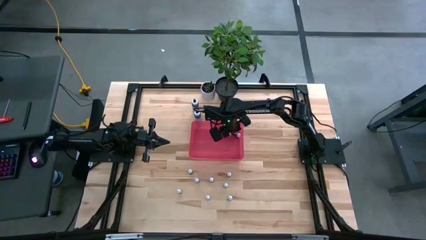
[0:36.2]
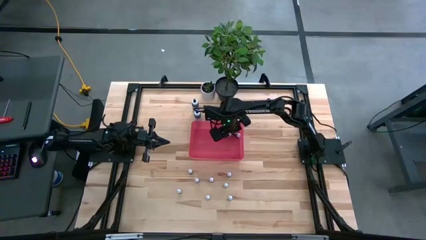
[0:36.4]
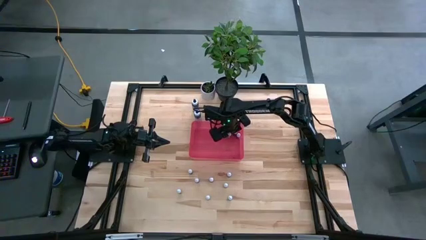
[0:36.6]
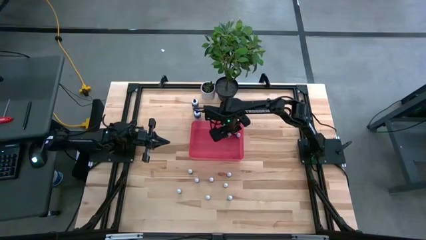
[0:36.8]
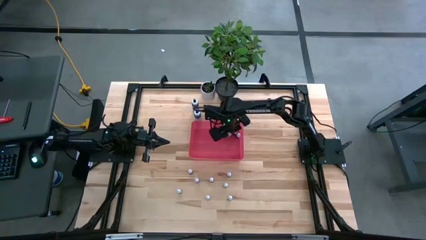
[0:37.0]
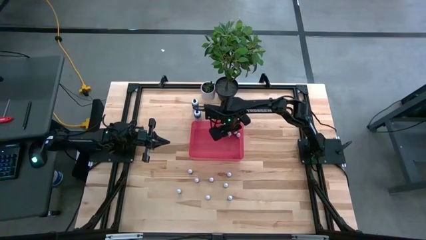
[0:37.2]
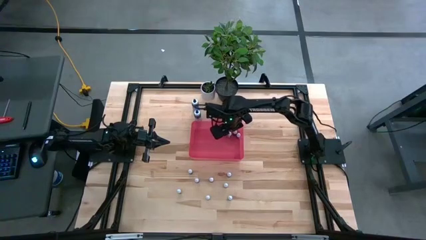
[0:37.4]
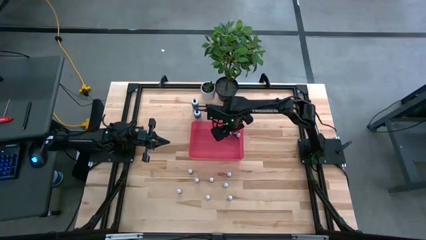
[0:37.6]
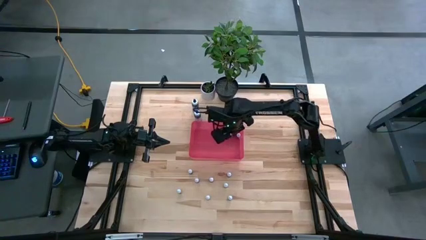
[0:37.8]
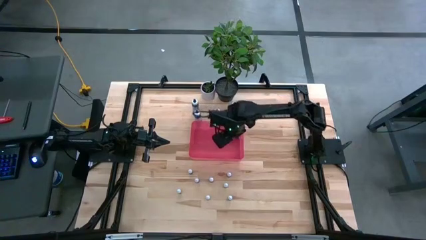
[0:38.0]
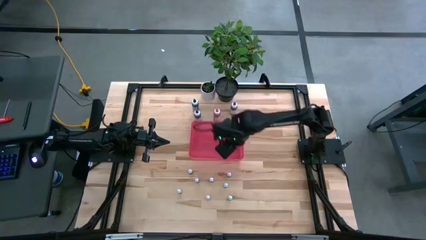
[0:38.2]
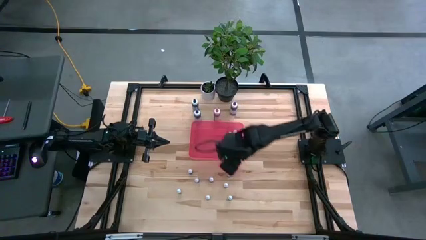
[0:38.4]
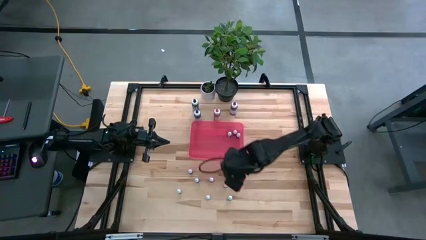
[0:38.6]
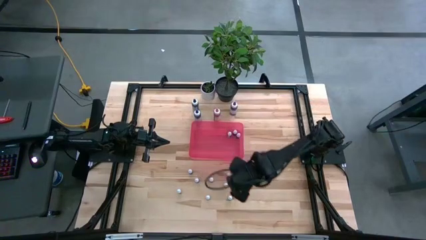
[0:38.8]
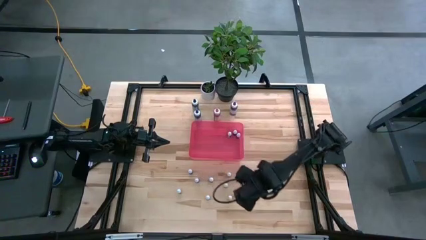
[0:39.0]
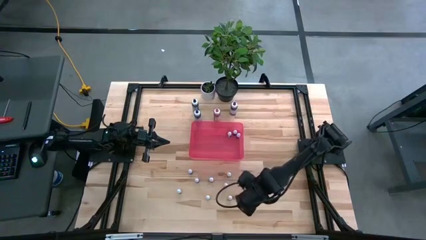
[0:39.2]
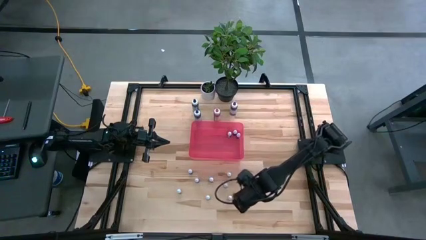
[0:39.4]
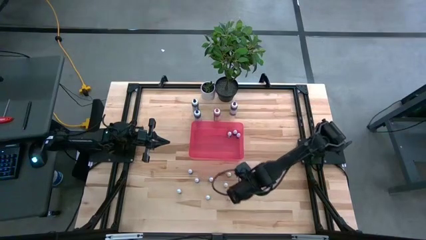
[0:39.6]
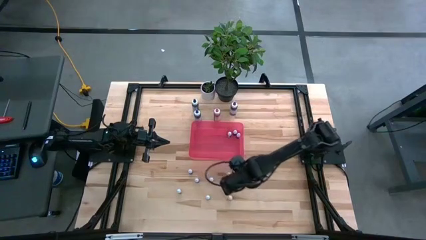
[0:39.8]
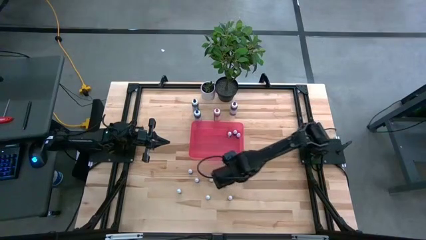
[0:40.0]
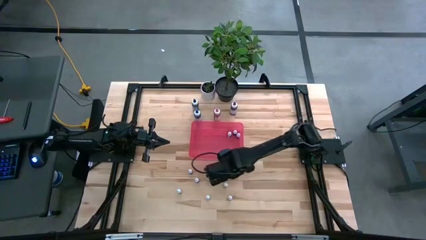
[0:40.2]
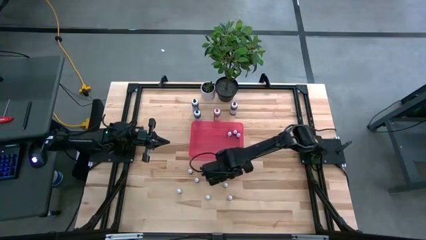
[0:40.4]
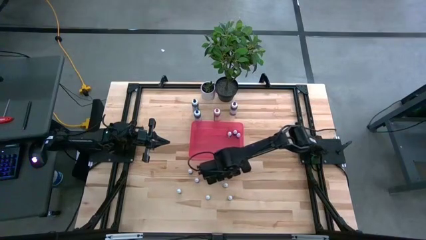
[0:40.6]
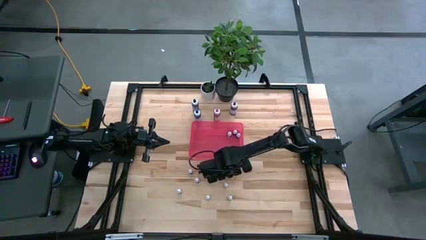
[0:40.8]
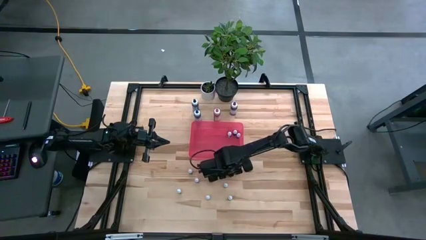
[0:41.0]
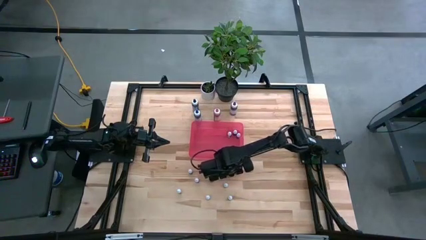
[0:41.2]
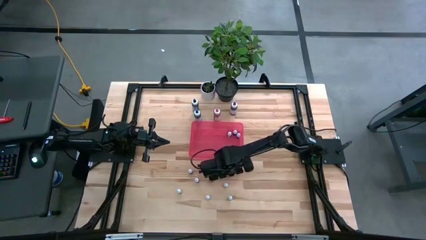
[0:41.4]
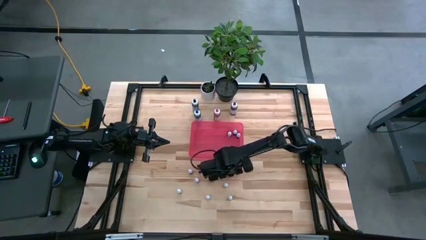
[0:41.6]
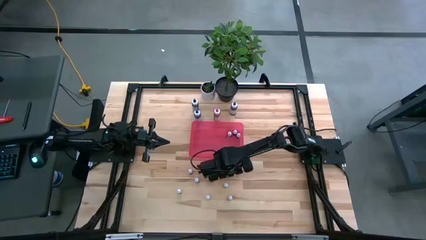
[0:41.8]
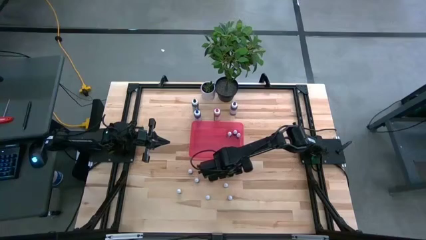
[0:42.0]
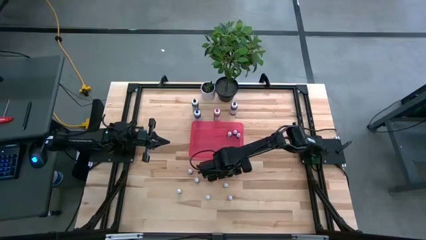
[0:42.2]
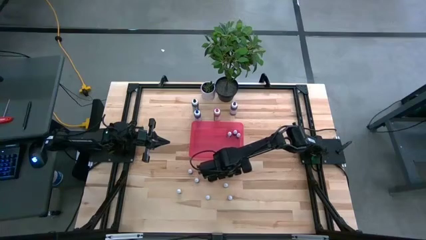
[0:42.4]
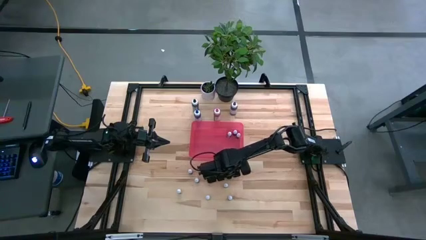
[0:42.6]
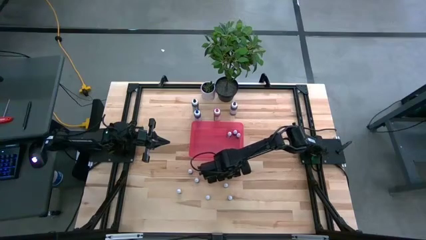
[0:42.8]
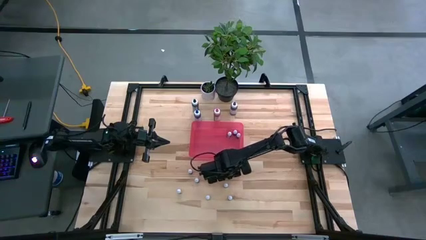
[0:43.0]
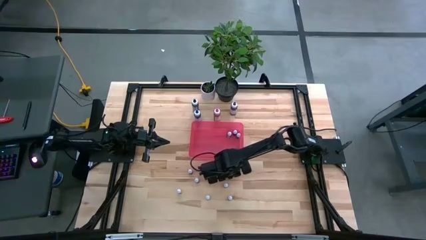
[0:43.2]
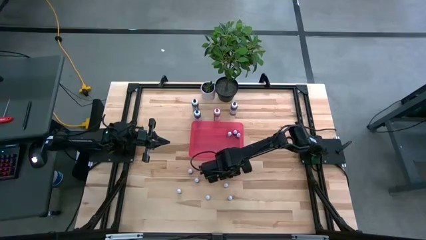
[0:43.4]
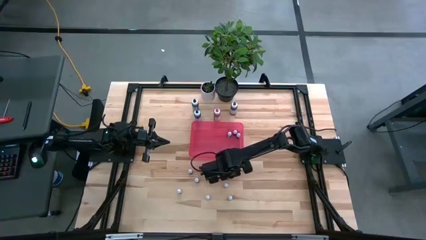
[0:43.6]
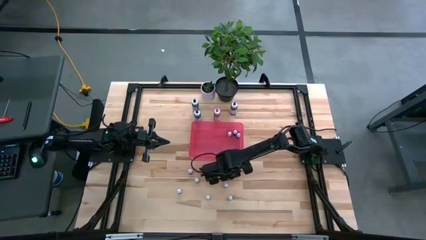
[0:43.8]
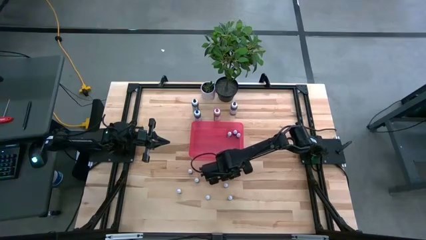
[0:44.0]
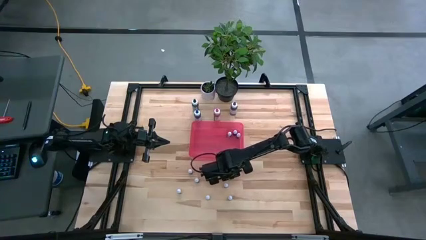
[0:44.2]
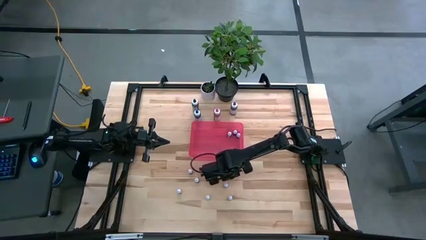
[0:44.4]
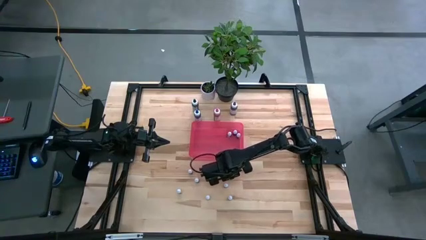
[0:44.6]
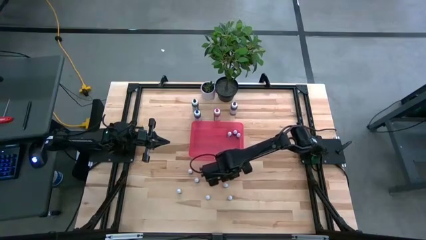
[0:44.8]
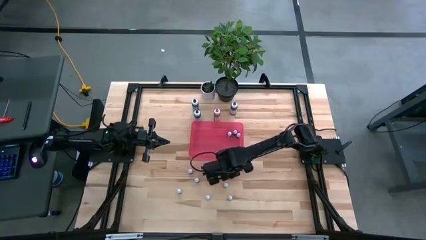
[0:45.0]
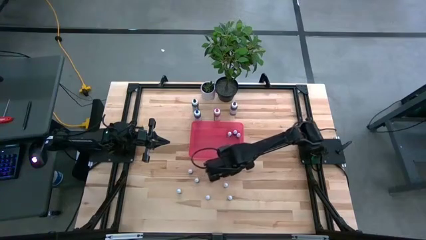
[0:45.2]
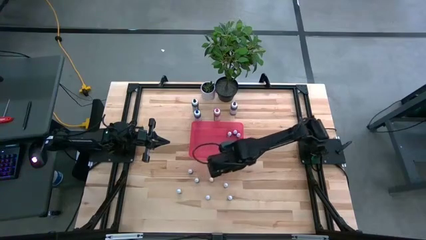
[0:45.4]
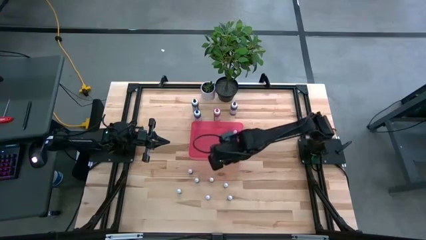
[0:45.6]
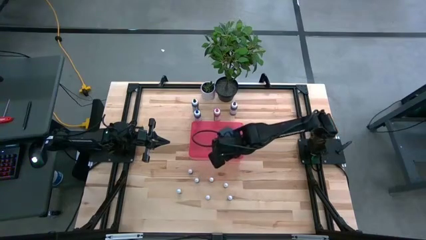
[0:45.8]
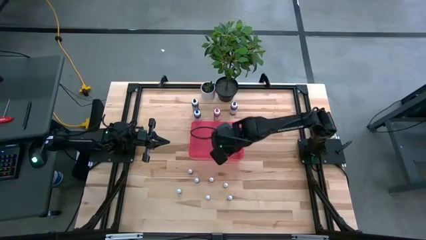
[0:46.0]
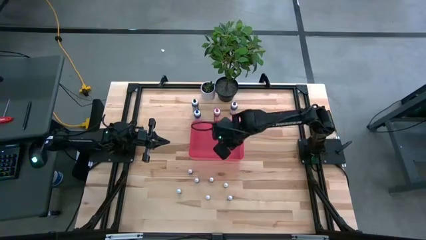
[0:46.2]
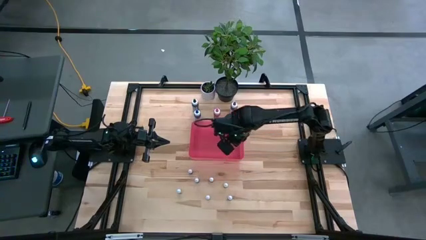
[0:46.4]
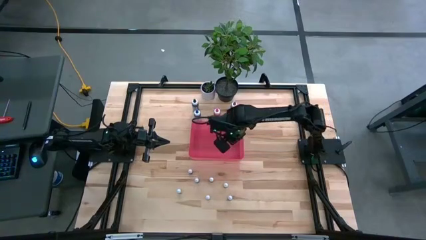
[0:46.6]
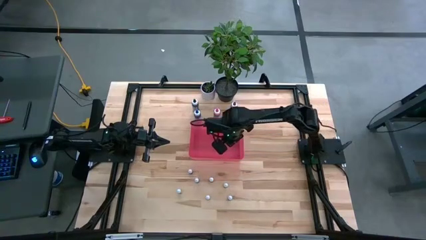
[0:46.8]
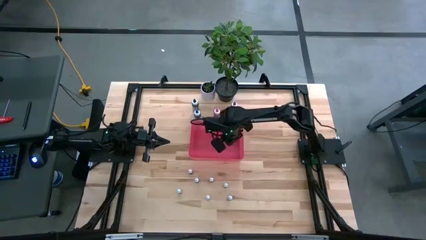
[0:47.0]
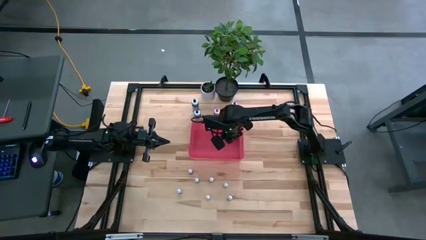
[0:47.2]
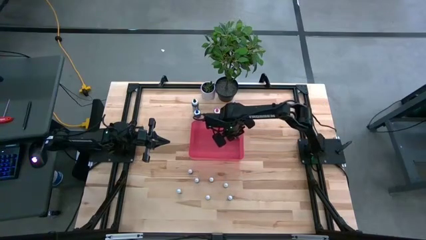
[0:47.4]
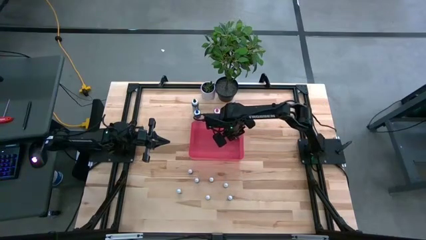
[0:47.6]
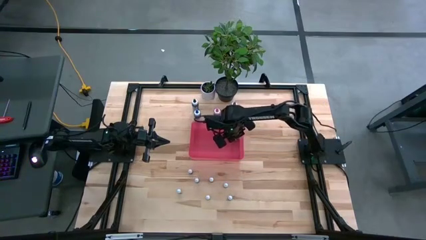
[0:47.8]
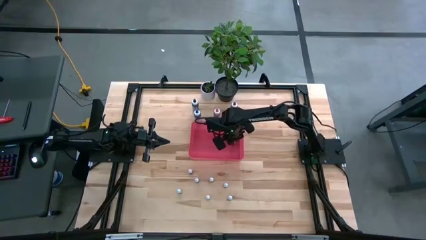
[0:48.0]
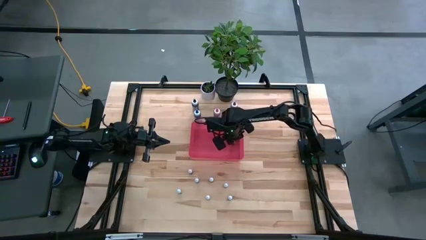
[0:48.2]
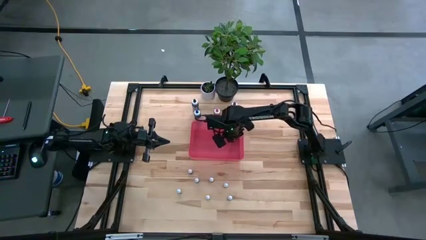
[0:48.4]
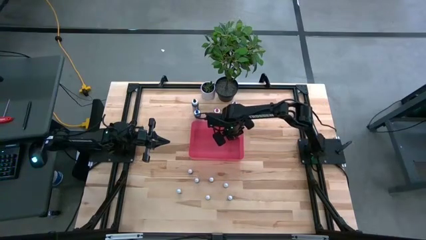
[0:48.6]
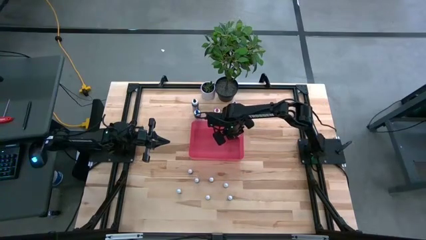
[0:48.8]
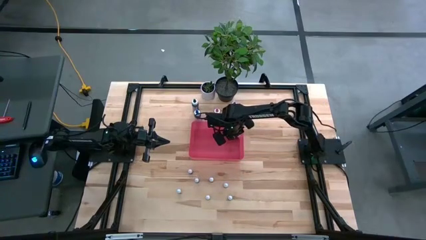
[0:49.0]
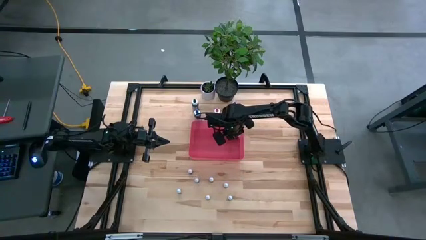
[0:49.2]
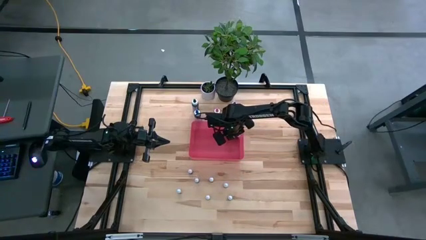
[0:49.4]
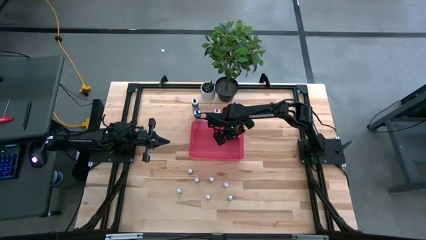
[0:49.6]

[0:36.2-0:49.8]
Task: Pick & Place food coloring
Put the small blue food coloring bottle into the pink container
